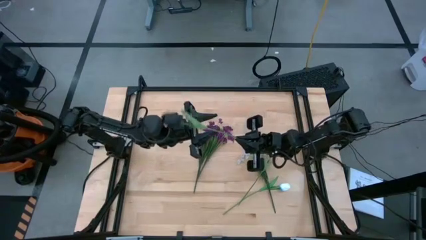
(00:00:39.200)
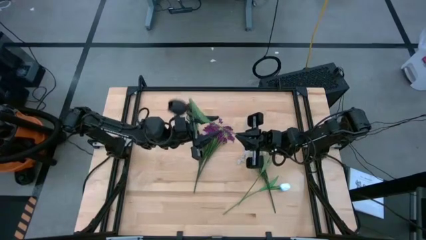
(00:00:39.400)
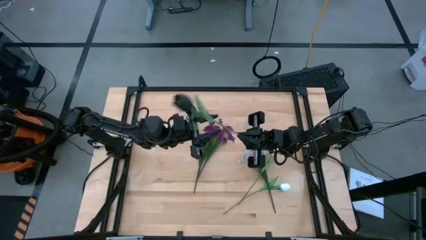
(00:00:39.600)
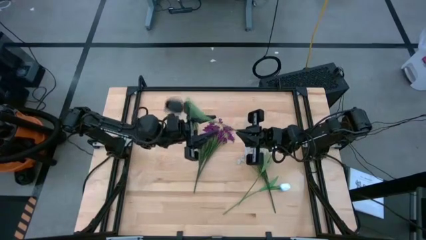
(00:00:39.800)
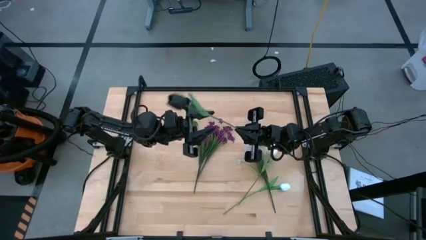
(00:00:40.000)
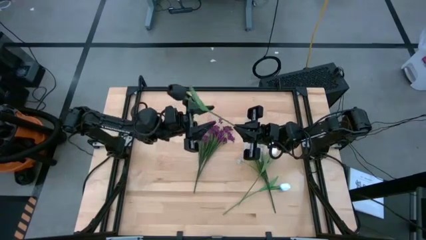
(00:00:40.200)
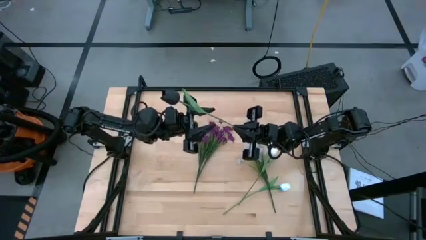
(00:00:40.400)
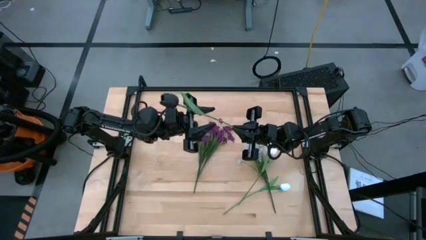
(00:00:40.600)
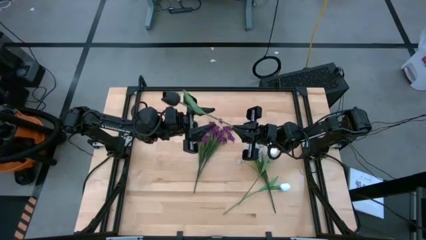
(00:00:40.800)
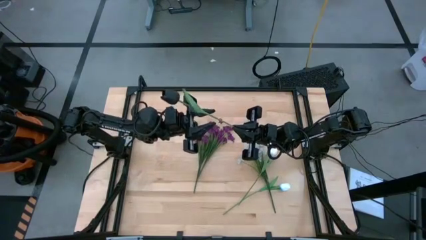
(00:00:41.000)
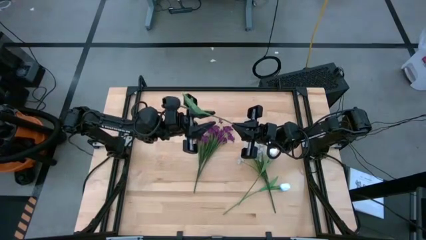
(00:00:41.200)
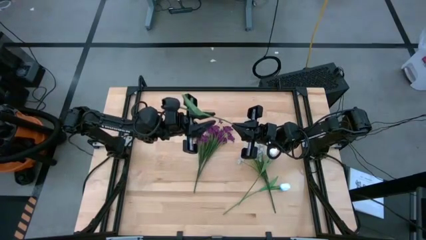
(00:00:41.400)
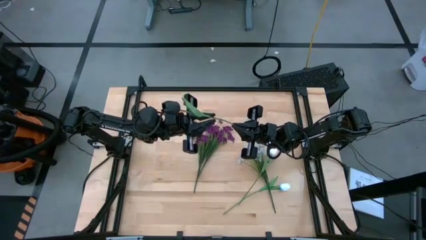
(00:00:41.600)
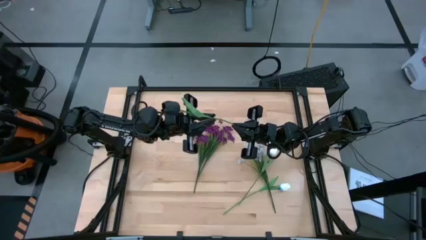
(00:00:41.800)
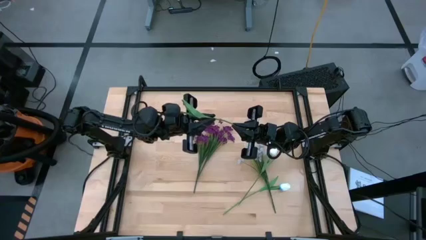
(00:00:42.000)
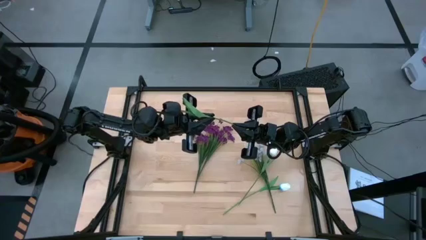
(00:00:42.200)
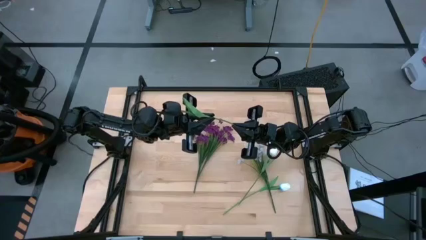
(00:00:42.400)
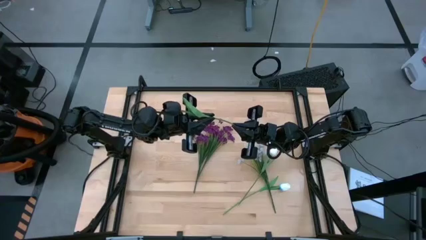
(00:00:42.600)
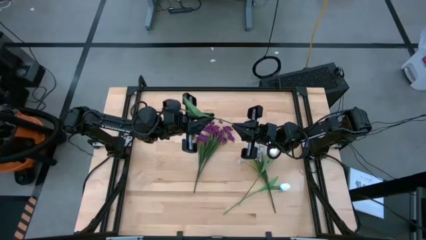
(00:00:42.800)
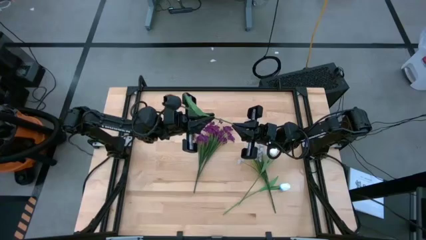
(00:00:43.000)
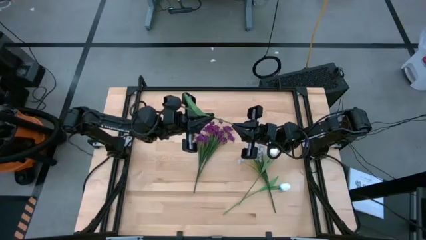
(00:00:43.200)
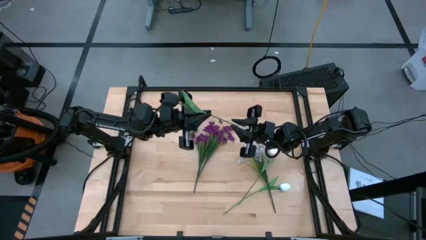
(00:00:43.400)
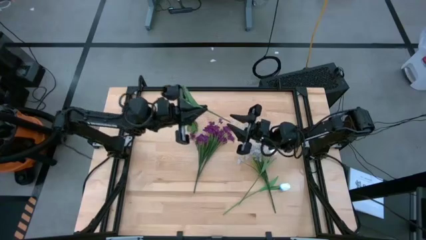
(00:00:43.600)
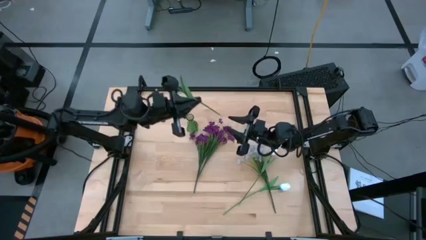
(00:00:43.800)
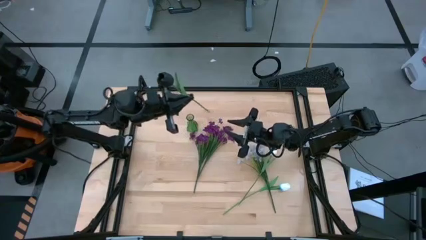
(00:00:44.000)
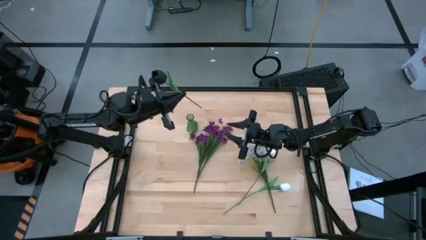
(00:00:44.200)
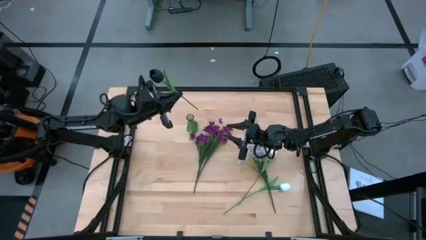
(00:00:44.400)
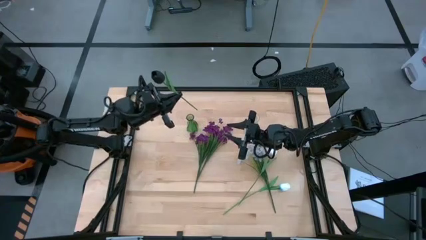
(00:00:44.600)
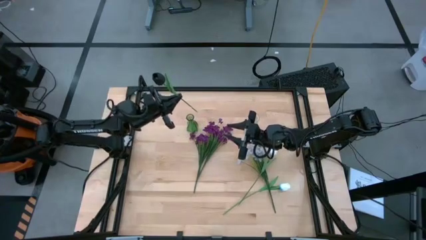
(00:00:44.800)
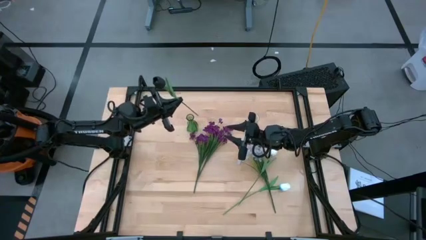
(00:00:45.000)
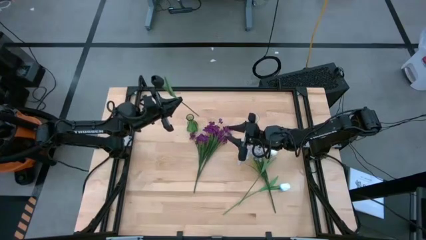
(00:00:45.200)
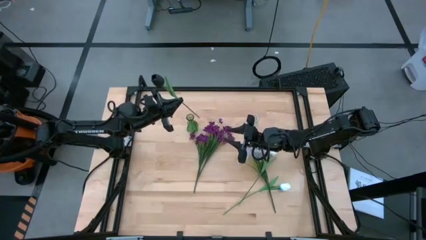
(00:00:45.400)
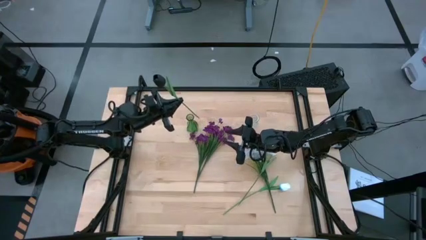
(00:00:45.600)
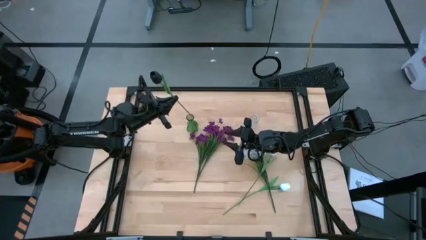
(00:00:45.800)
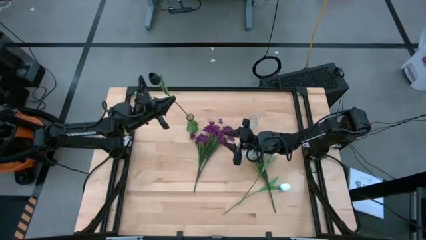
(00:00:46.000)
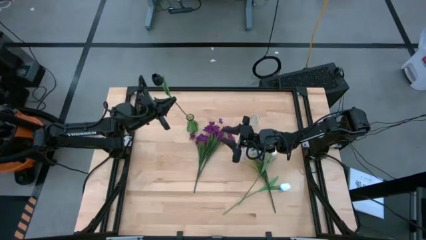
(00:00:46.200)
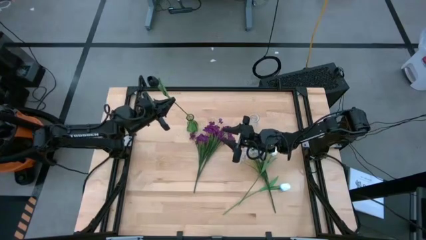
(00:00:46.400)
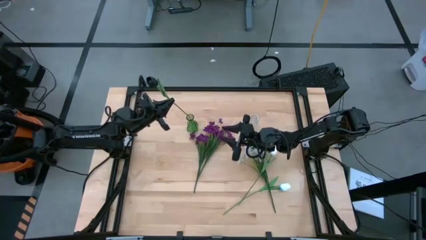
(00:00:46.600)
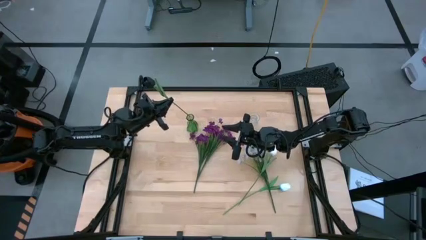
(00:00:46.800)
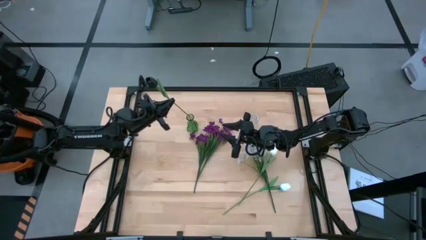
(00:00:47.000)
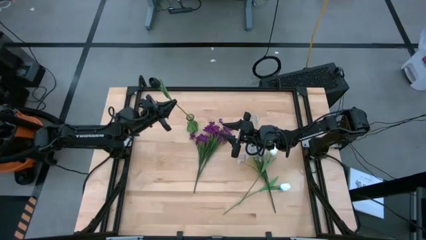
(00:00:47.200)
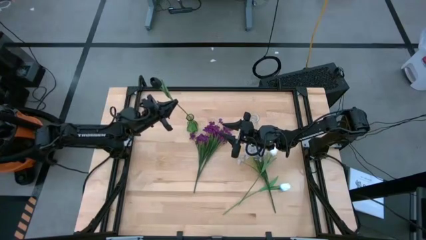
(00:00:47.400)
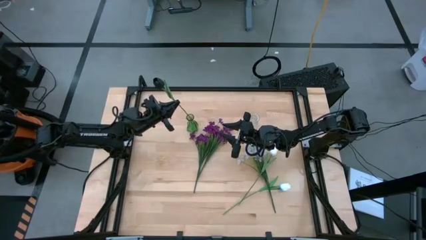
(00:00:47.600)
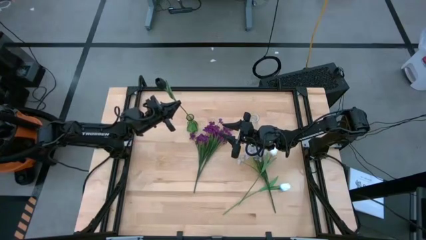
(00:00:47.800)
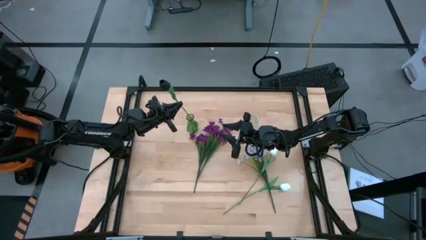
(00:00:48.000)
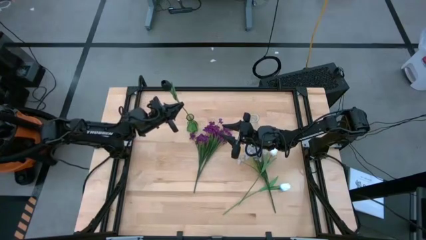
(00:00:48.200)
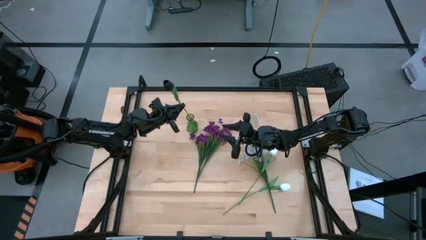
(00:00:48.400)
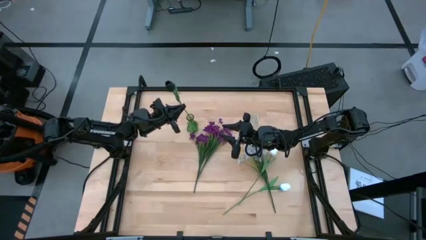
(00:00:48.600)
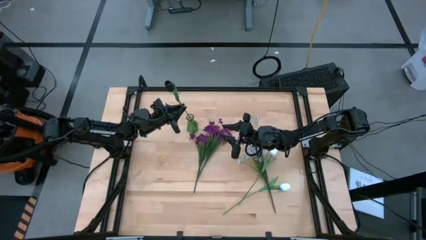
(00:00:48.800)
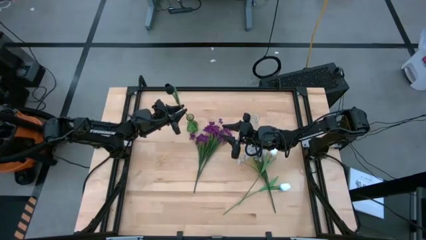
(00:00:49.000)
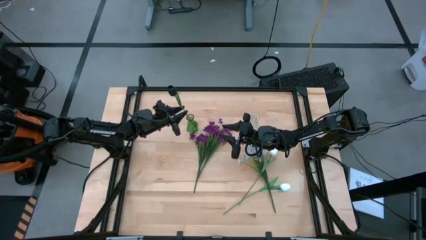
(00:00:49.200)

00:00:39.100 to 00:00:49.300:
Task: Sort flowers into vase by color
Put the black flower into the green vase

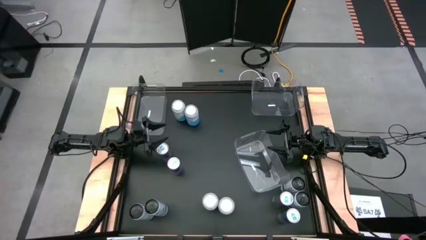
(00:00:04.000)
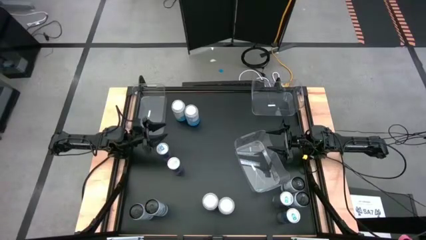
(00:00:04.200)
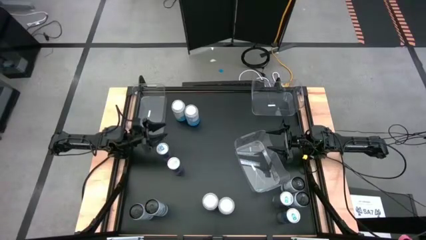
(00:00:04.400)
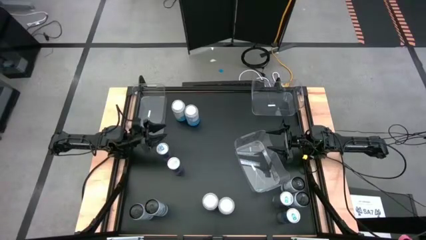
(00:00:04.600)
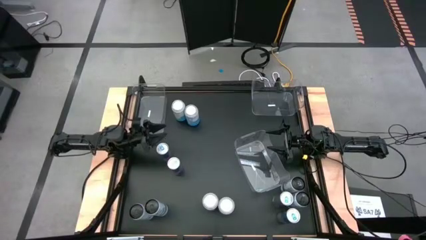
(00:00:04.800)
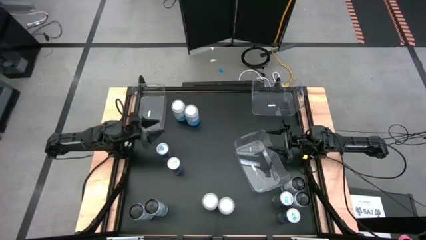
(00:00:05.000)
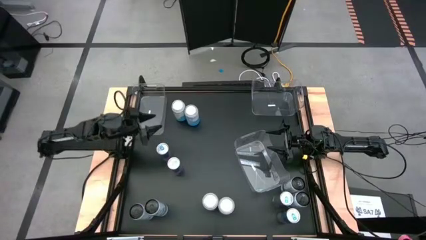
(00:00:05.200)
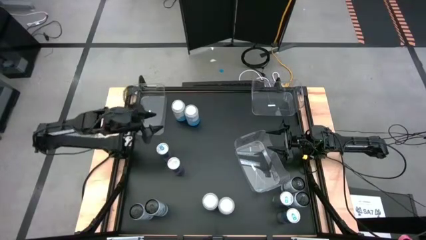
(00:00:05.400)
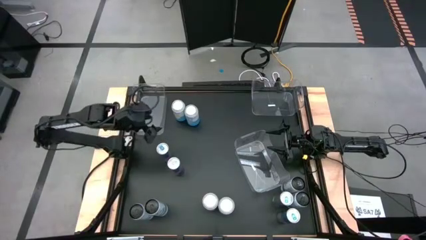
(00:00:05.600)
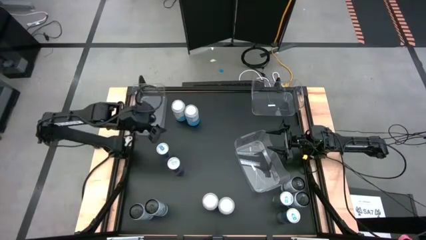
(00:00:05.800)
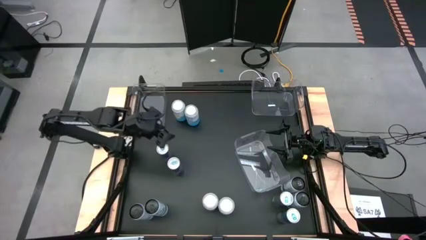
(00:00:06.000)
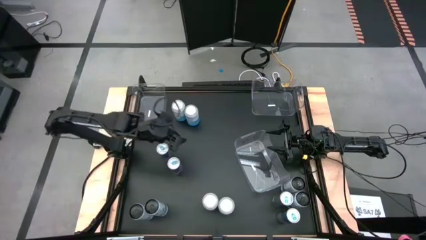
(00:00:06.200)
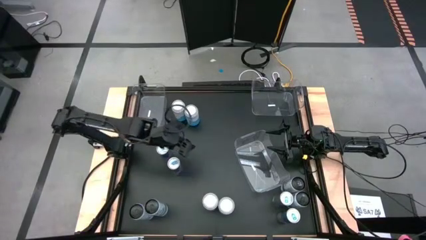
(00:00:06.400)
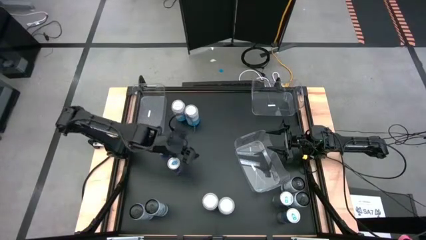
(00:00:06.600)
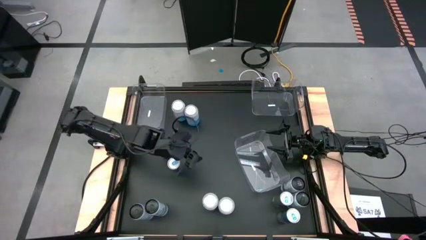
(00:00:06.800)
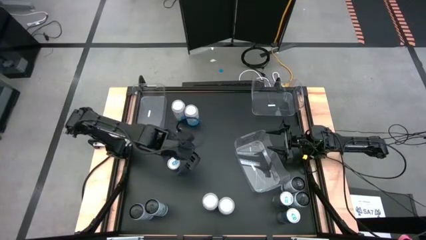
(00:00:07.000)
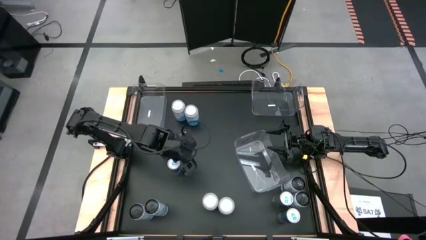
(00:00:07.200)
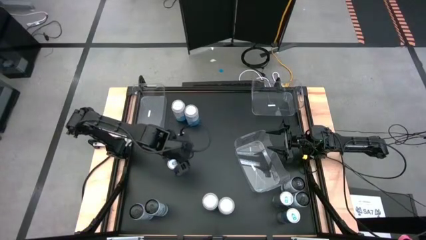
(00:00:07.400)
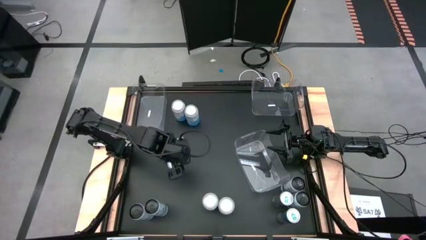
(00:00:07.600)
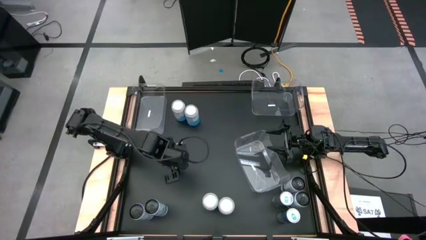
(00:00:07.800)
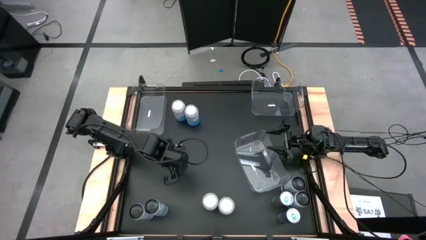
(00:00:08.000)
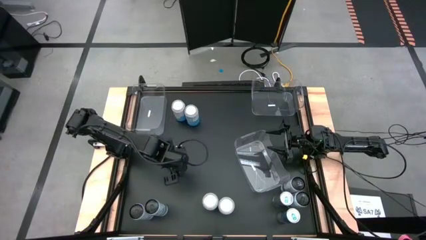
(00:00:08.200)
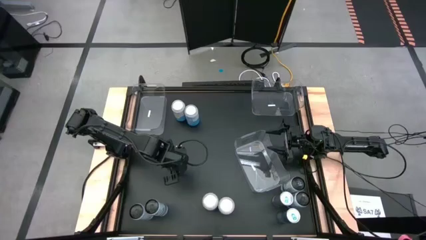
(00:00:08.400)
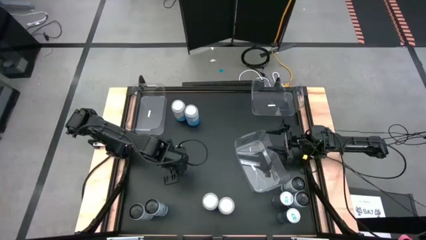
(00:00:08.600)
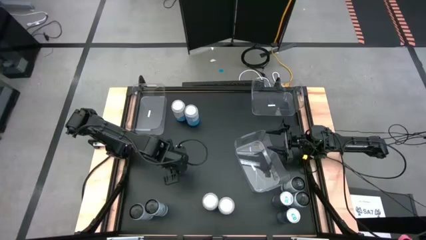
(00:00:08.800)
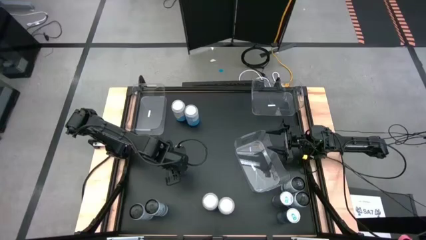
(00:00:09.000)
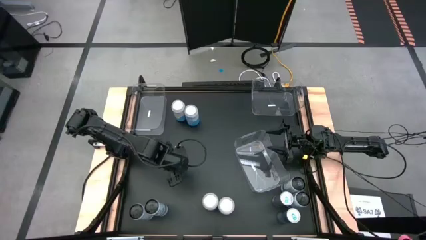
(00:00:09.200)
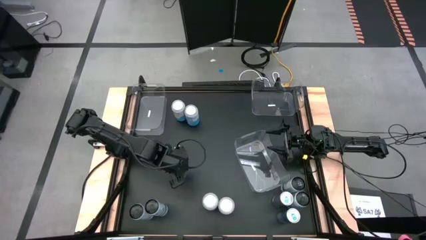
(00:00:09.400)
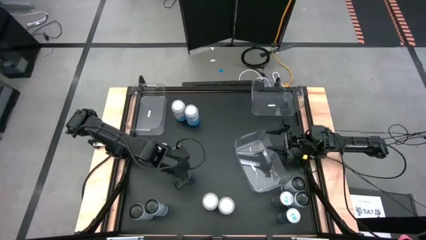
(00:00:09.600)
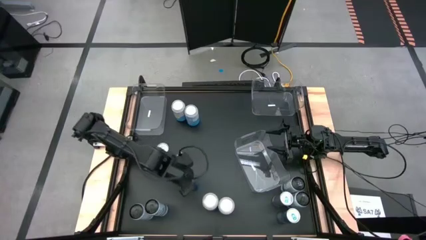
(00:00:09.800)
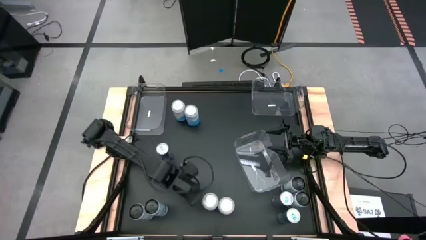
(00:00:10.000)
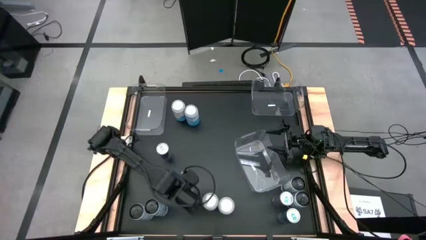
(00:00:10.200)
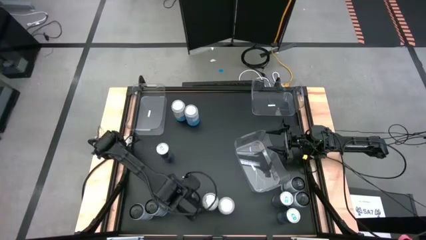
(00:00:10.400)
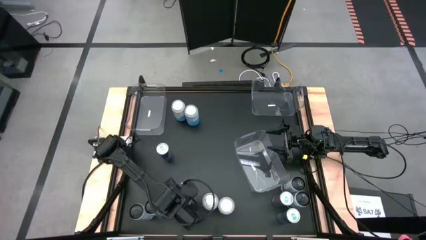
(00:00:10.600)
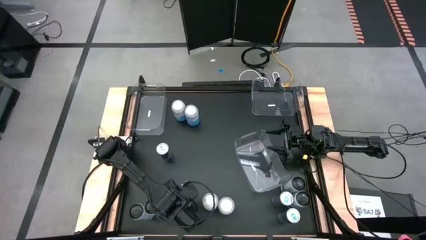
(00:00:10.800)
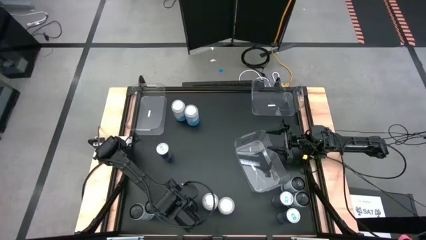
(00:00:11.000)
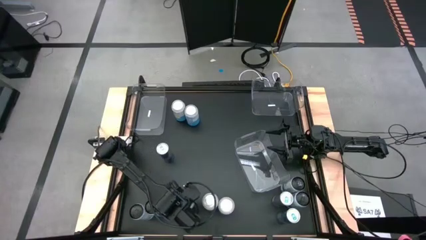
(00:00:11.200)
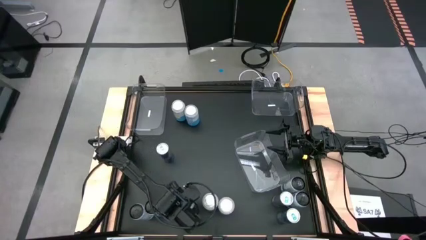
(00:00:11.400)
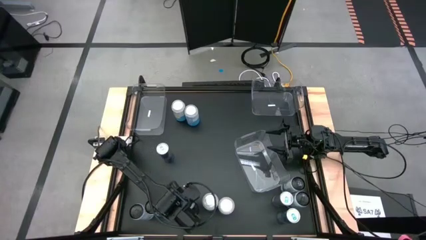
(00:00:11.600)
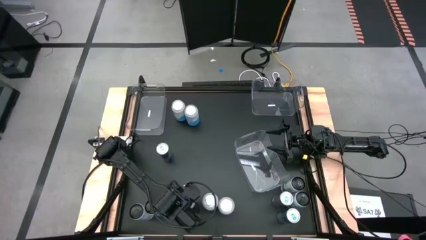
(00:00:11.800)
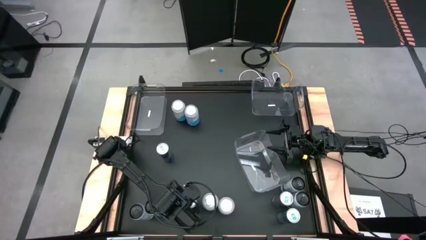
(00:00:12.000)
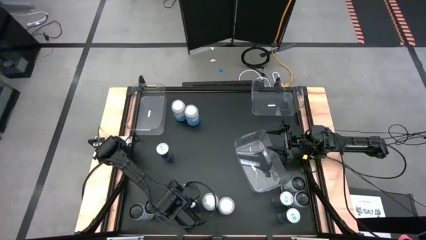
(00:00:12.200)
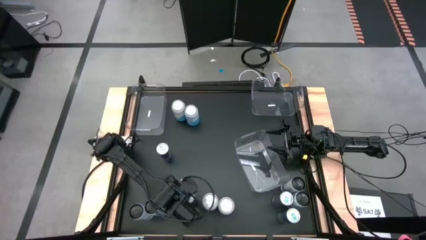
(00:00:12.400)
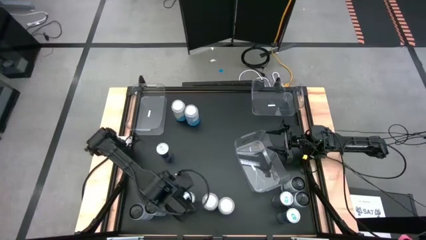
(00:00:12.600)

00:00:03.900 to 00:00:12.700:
Task: Sort soda cans
Move the top left blue soda can to the bottom center
